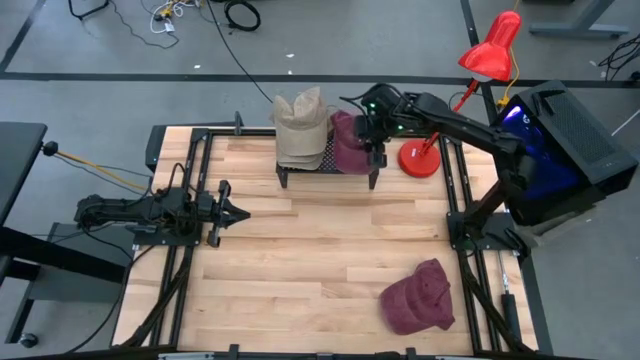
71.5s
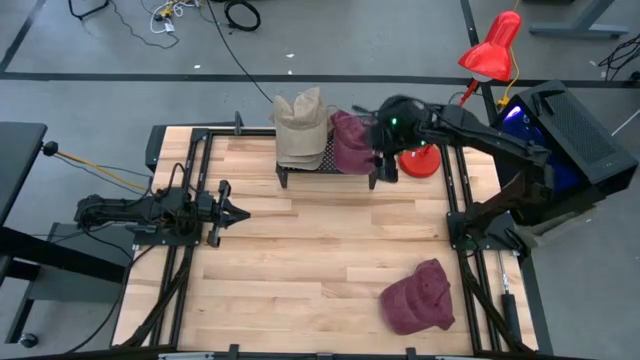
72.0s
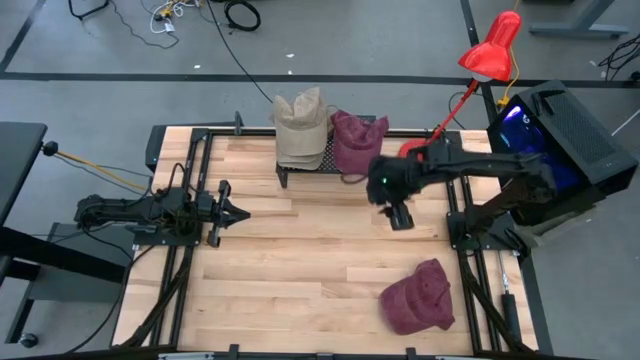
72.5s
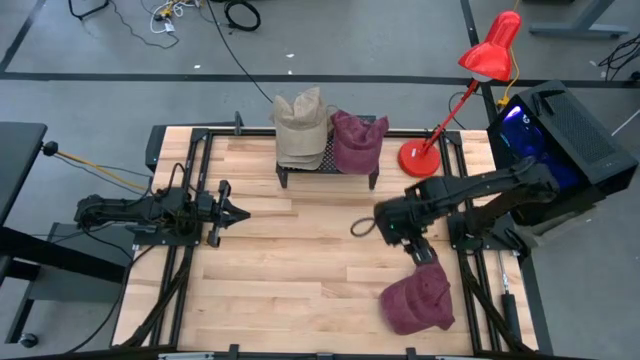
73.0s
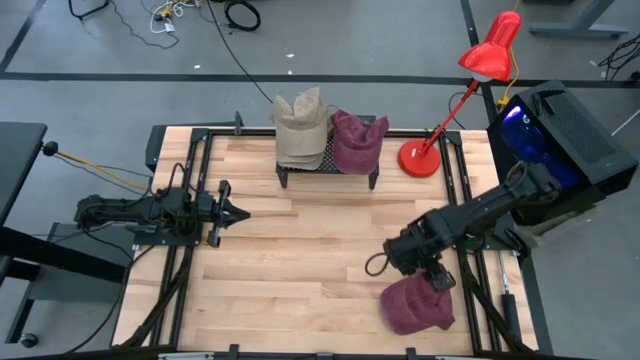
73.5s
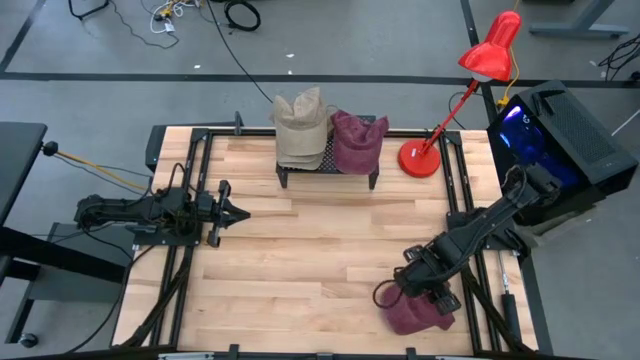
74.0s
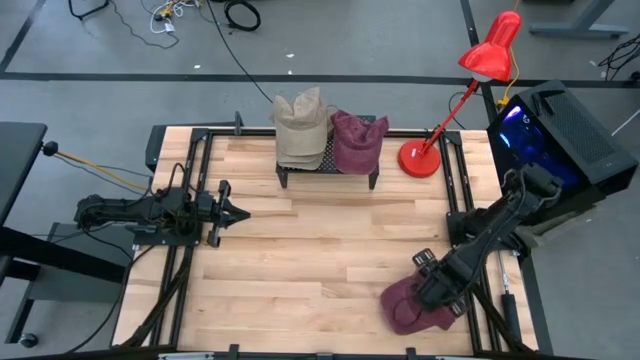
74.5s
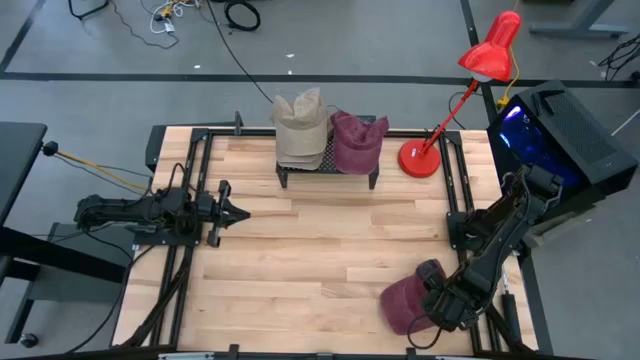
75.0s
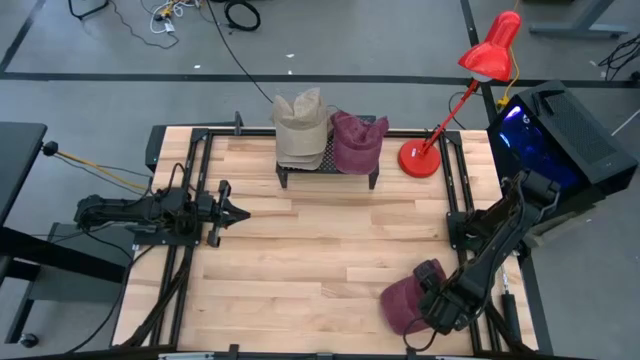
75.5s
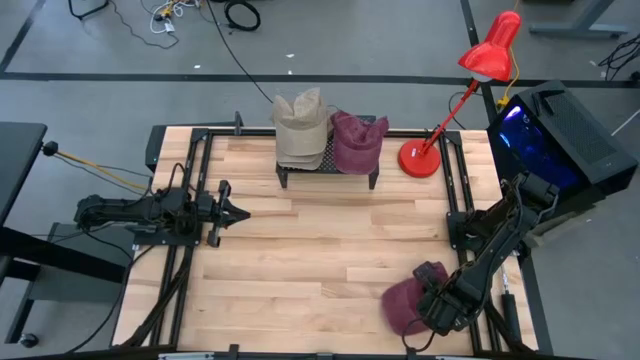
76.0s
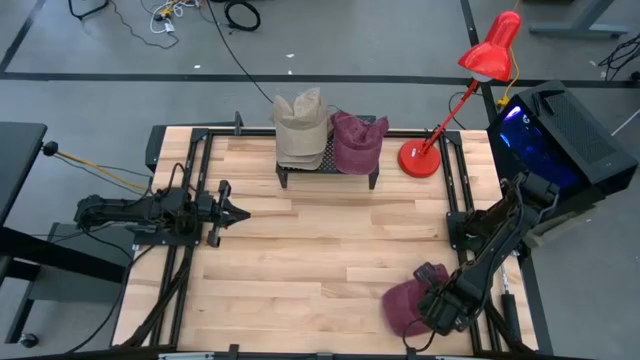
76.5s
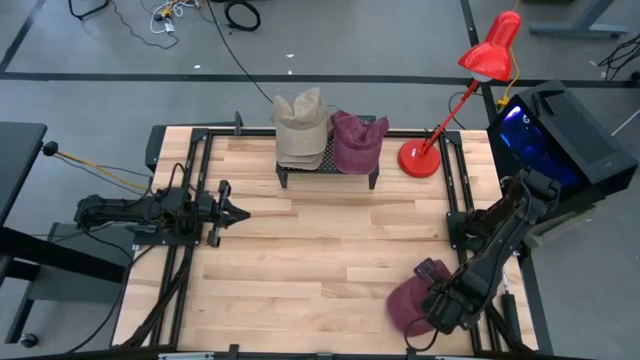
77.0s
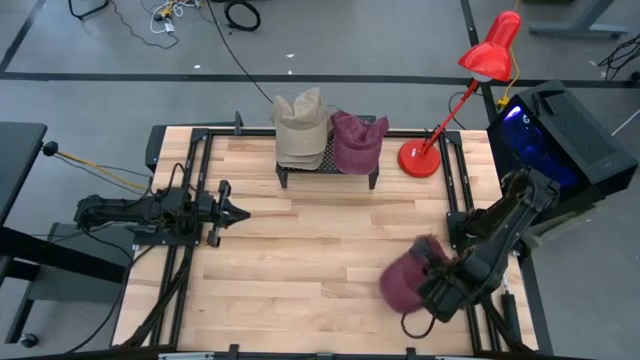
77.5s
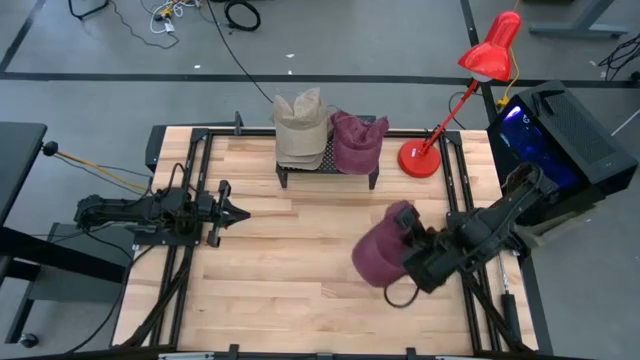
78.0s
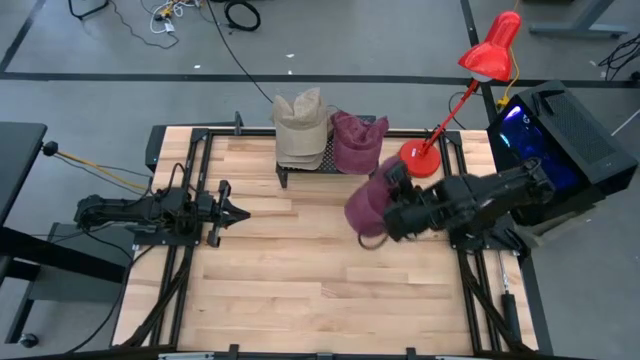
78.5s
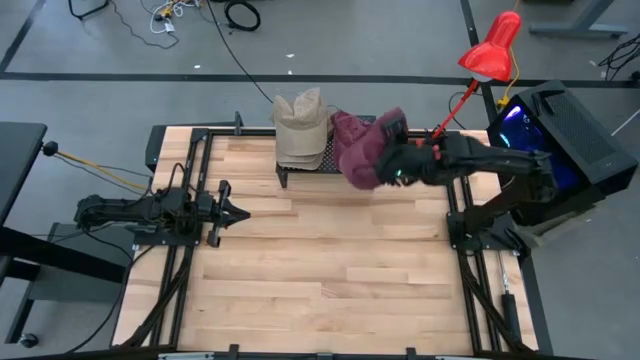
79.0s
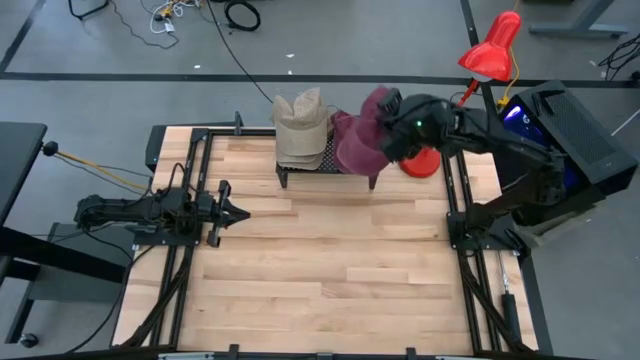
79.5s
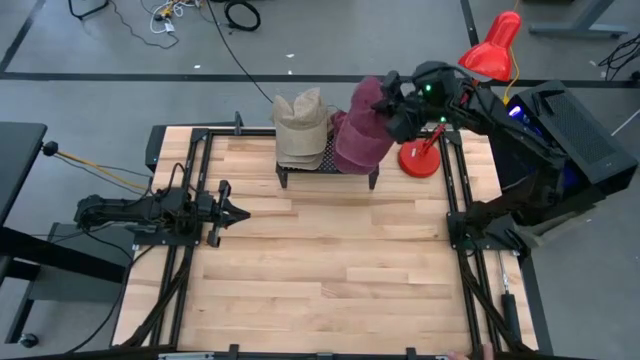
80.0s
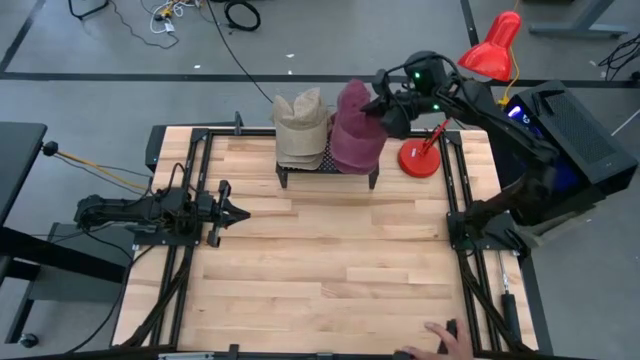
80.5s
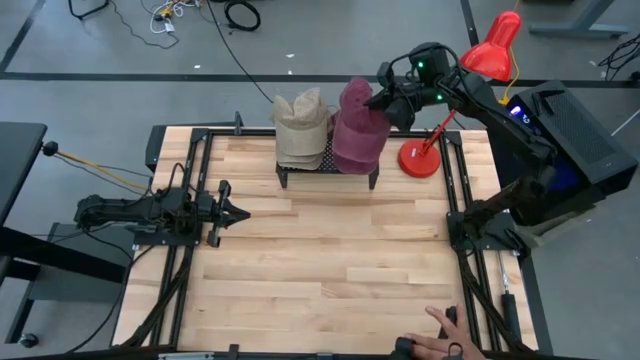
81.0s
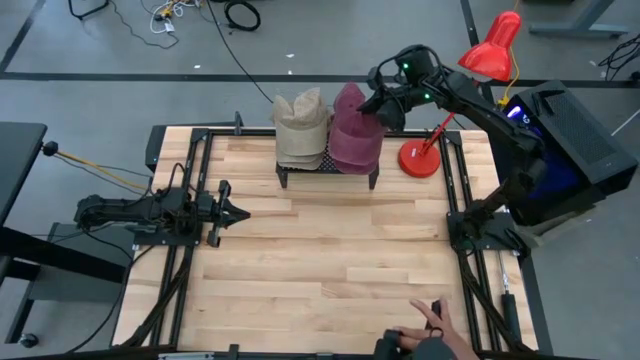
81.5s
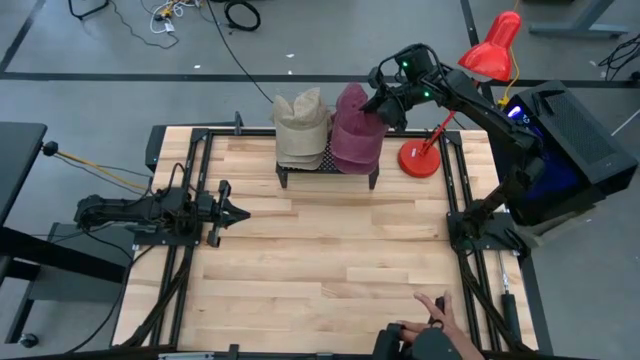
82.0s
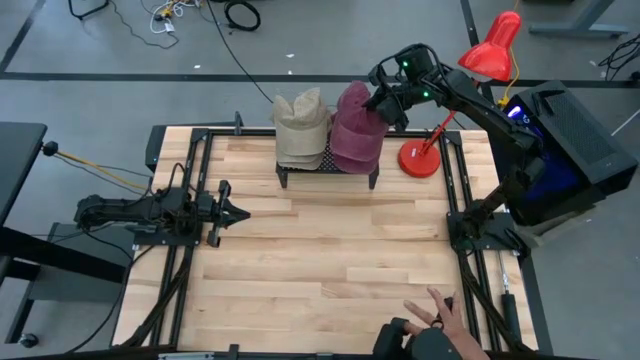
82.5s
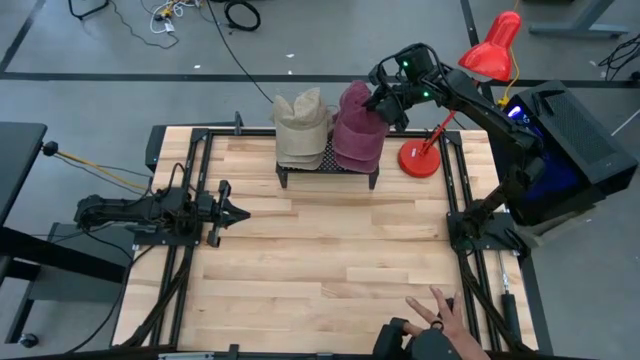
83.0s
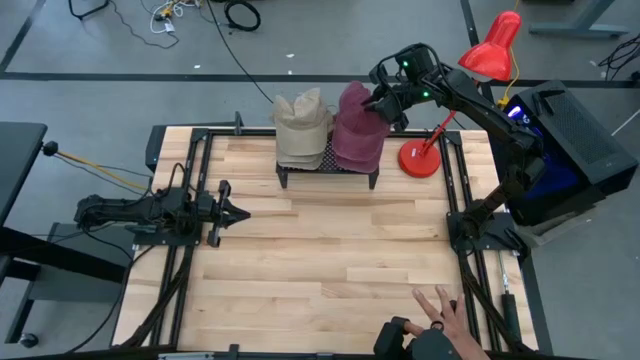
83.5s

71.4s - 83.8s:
Task: Pick & Place hat
Stack the red cap on top of the other red cap on the shelf

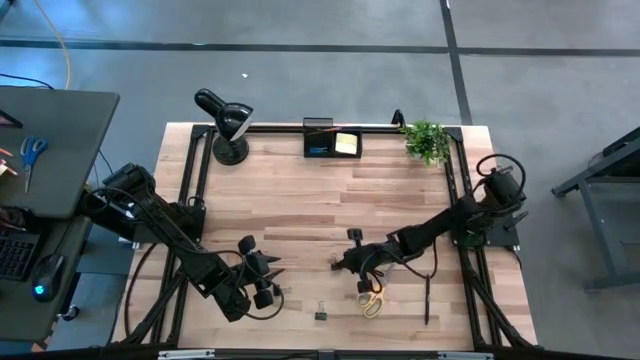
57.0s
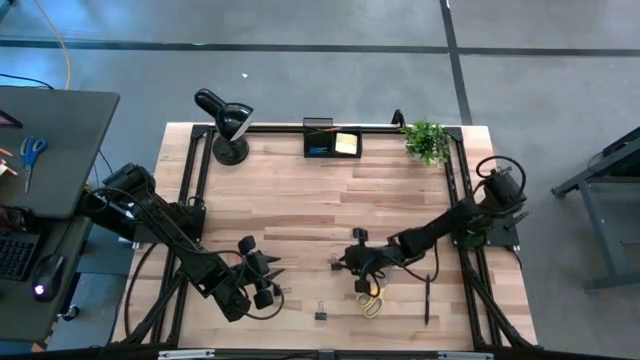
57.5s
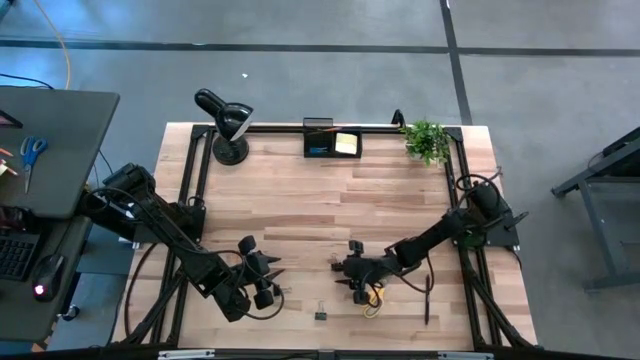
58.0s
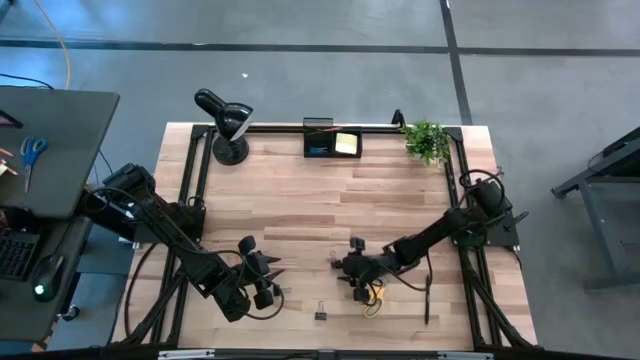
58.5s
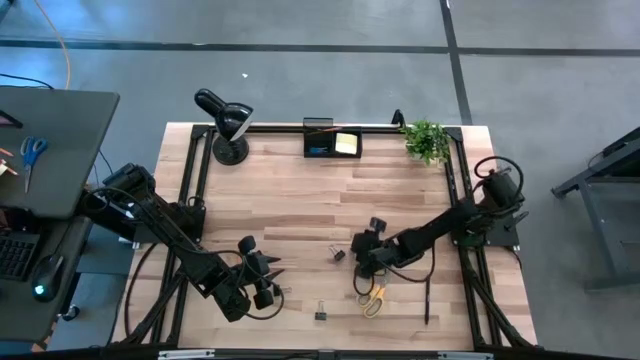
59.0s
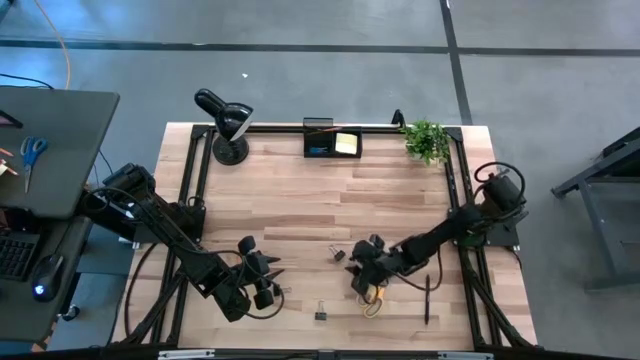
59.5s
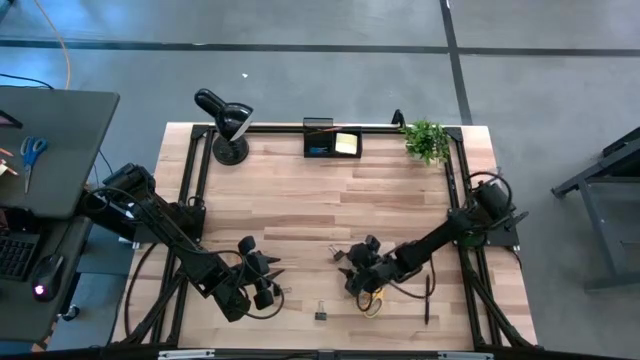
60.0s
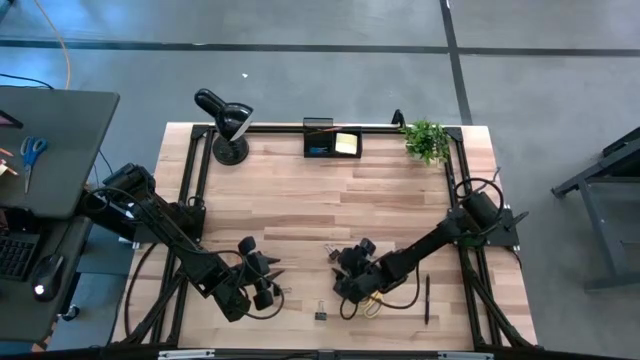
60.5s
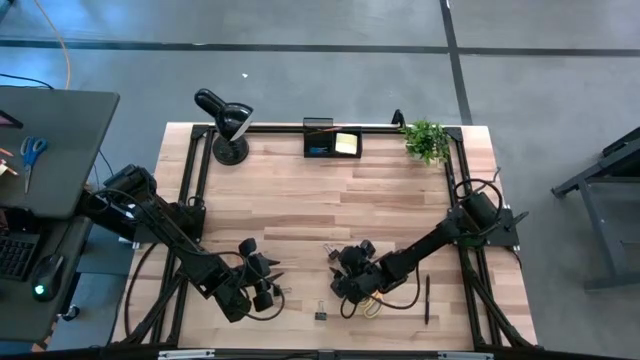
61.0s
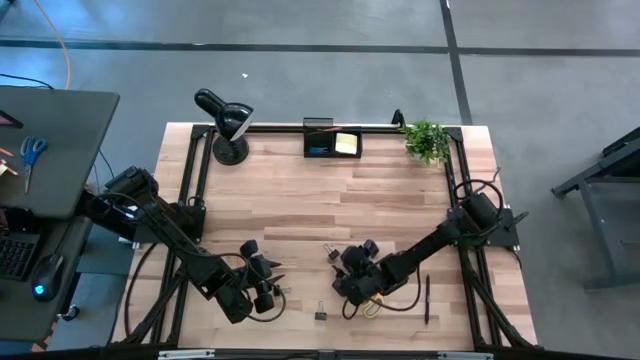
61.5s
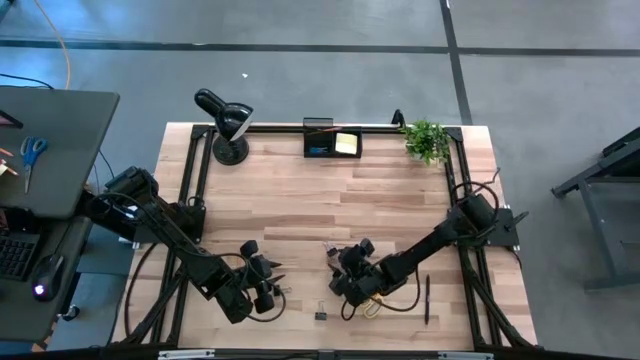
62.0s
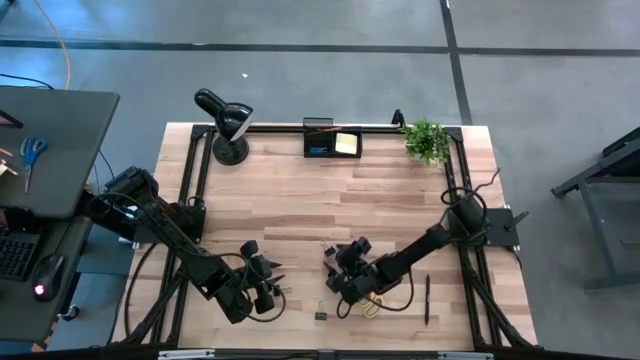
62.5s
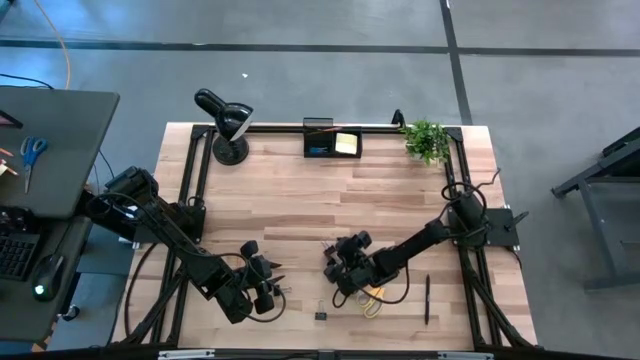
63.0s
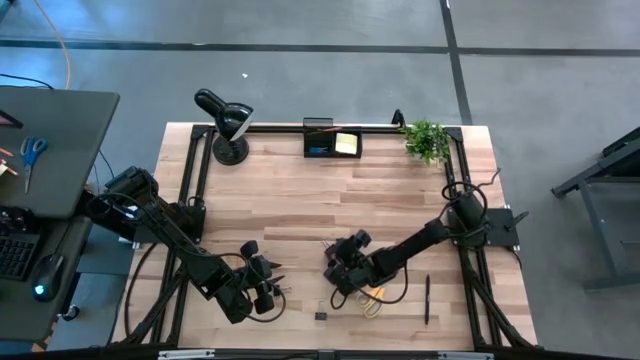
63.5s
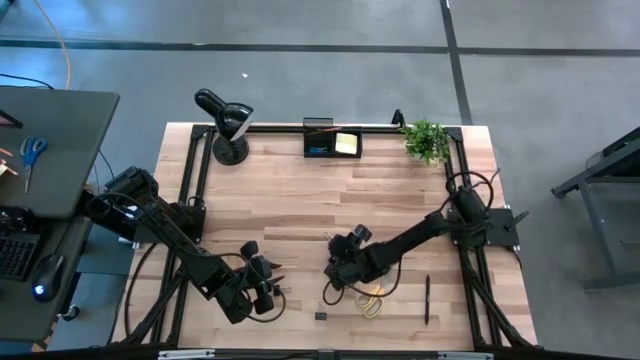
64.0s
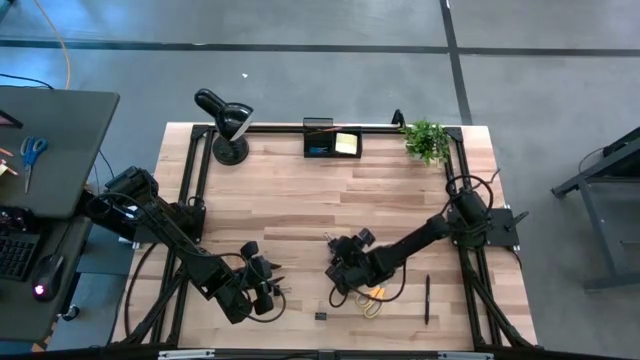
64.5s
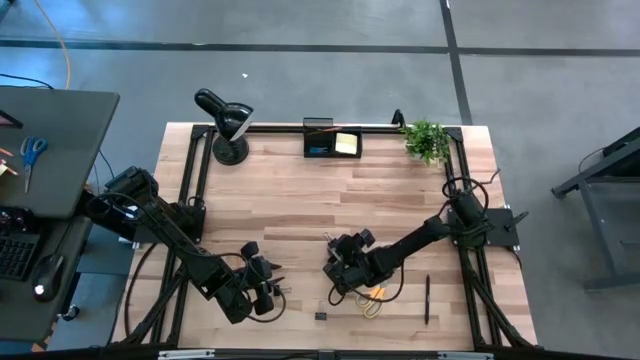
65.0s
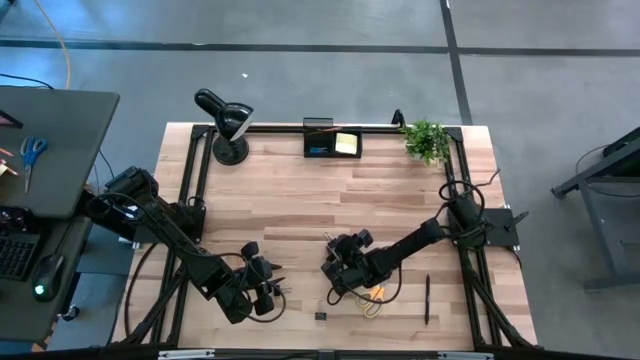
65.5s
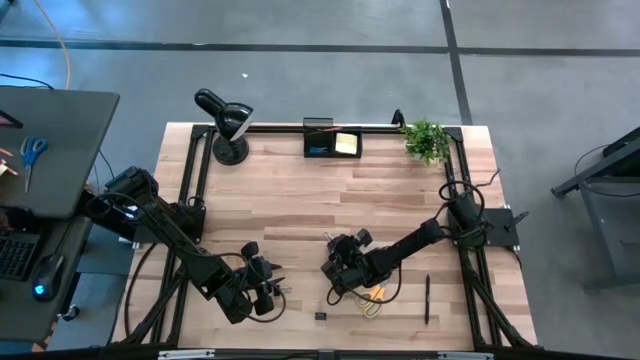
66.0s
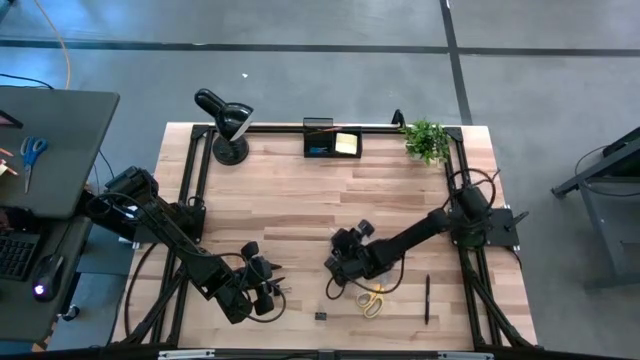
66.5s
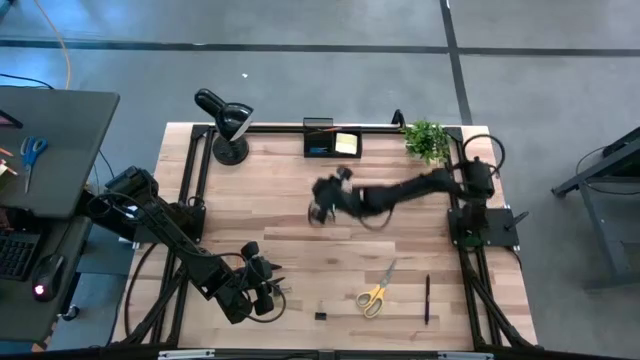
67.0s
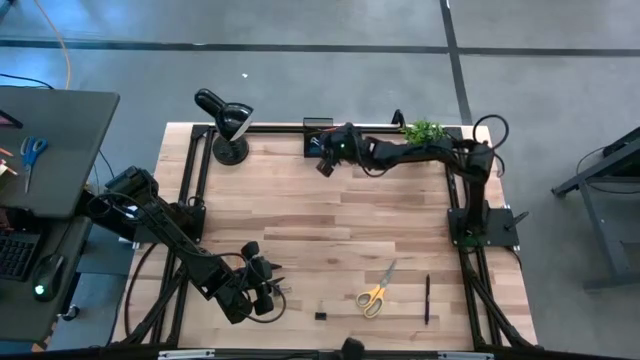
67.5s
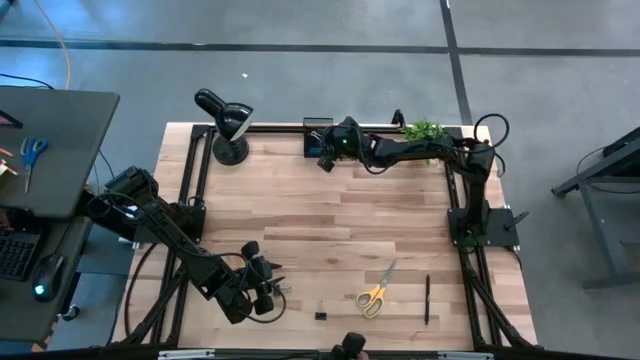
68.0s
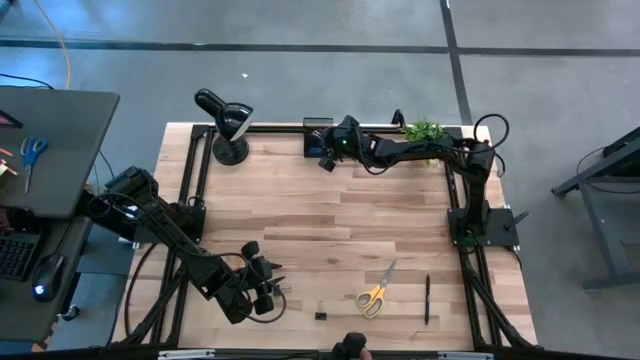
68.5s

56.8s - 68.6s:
Task: Pick and place office supplies into organizer
Put the black binder clip into the black desk organizer
